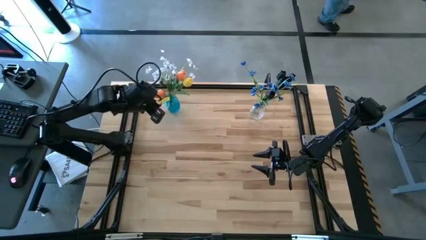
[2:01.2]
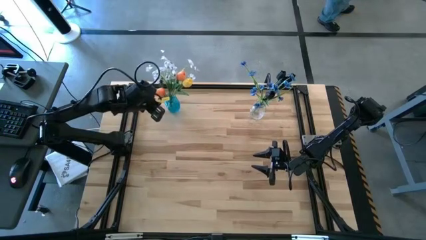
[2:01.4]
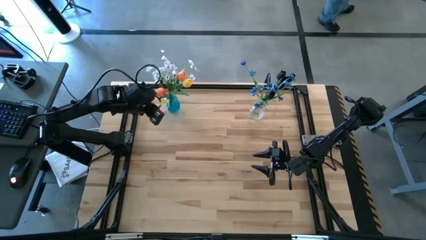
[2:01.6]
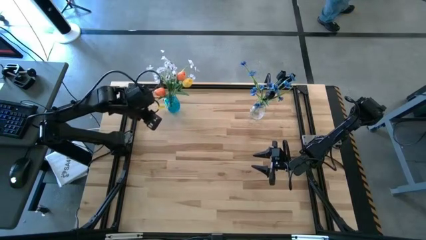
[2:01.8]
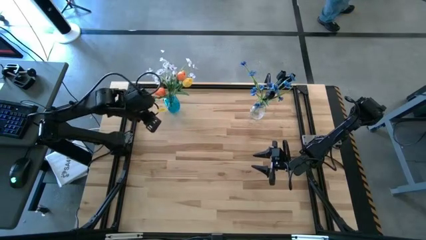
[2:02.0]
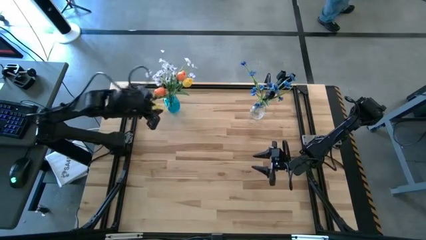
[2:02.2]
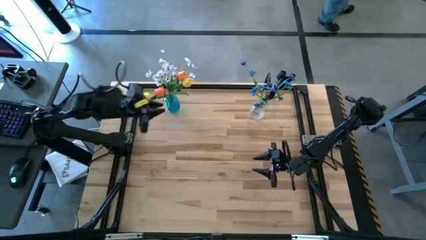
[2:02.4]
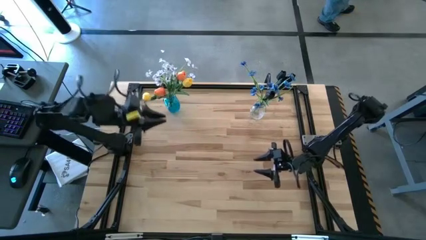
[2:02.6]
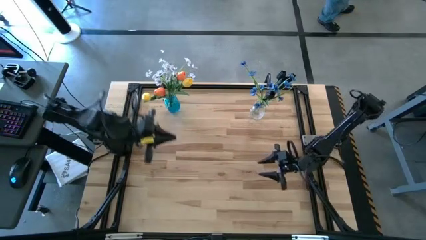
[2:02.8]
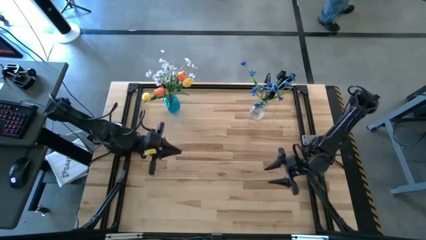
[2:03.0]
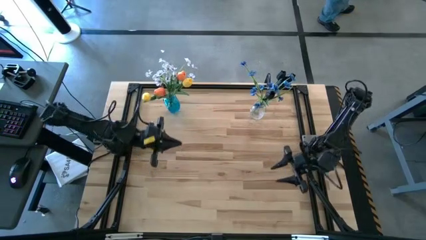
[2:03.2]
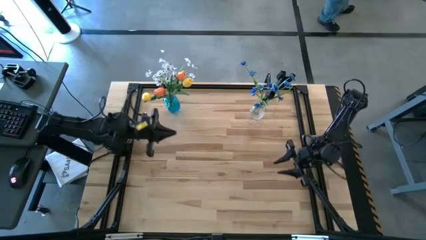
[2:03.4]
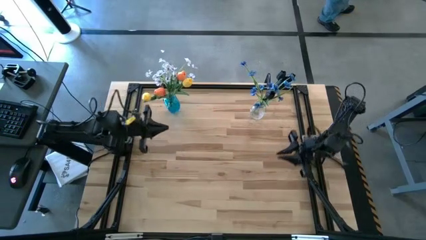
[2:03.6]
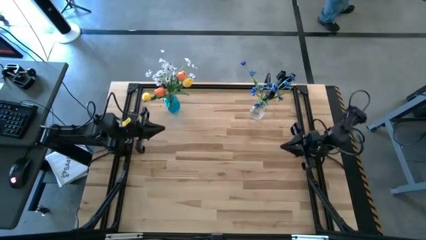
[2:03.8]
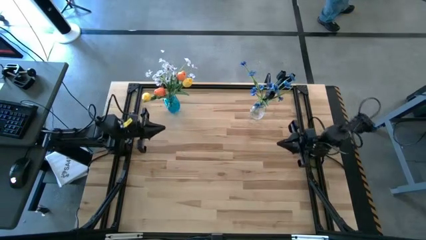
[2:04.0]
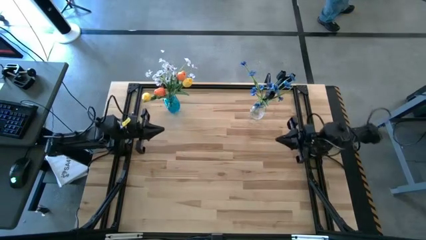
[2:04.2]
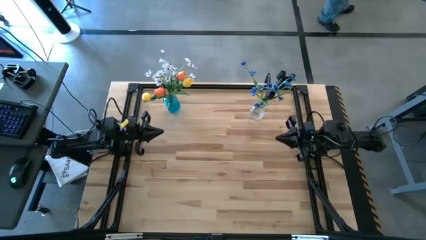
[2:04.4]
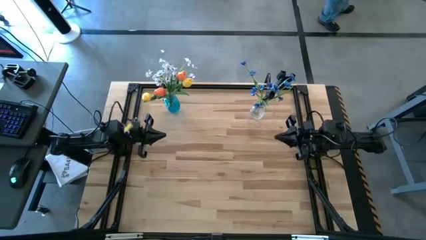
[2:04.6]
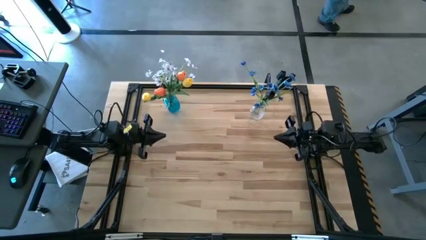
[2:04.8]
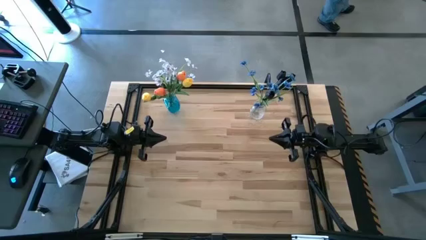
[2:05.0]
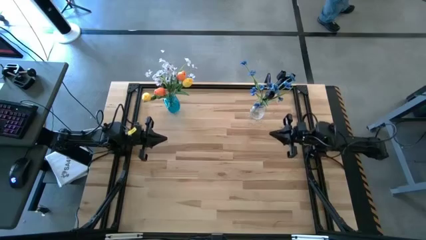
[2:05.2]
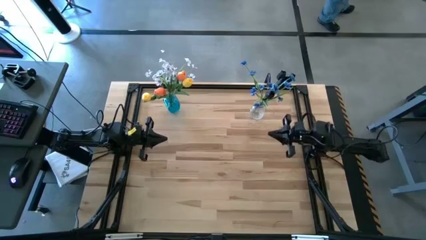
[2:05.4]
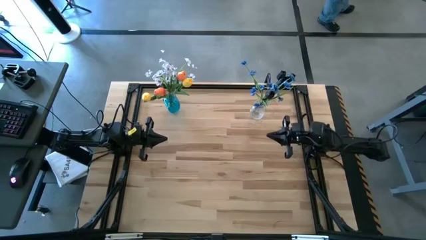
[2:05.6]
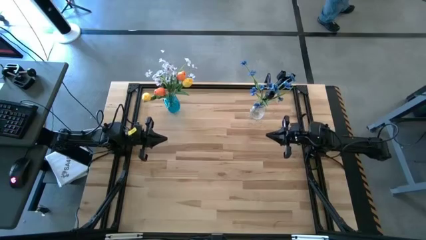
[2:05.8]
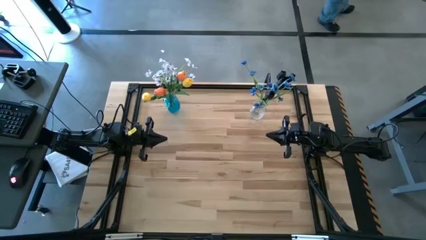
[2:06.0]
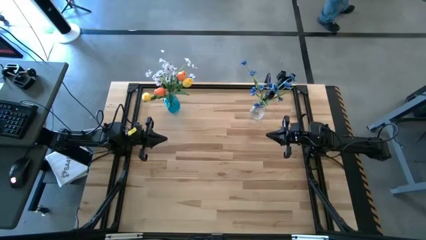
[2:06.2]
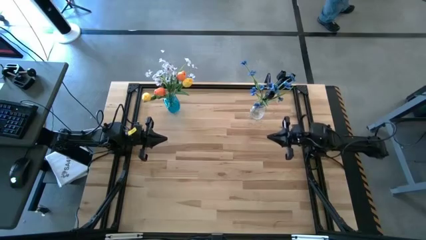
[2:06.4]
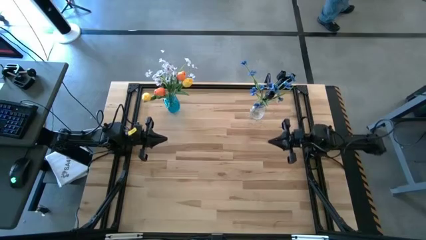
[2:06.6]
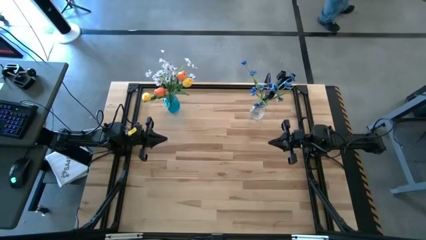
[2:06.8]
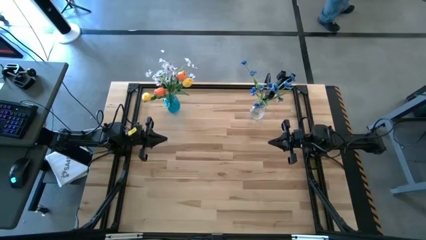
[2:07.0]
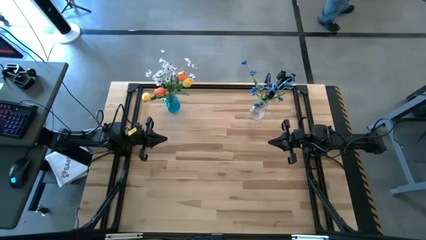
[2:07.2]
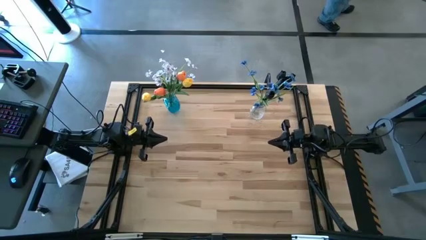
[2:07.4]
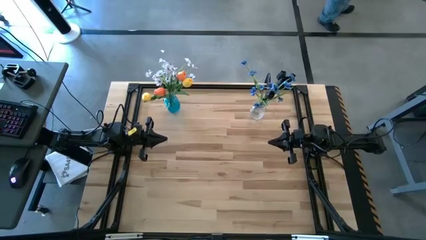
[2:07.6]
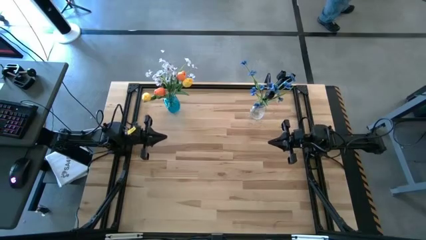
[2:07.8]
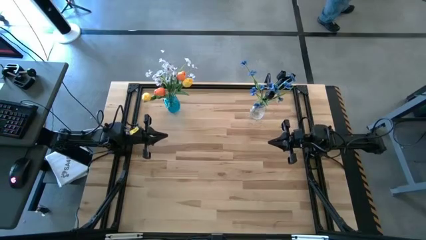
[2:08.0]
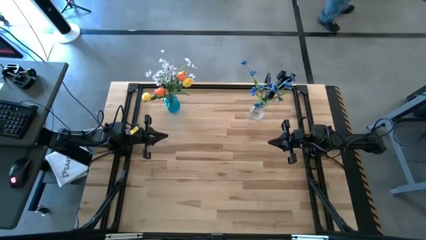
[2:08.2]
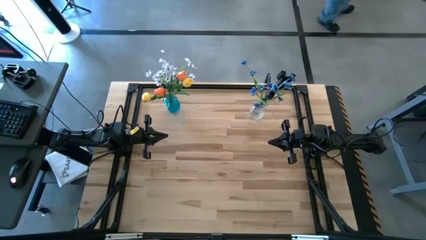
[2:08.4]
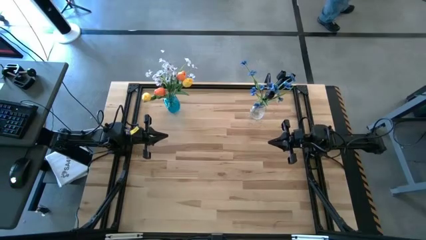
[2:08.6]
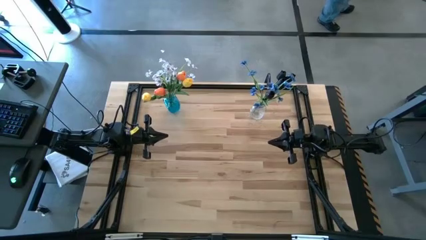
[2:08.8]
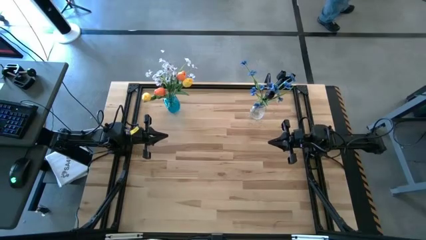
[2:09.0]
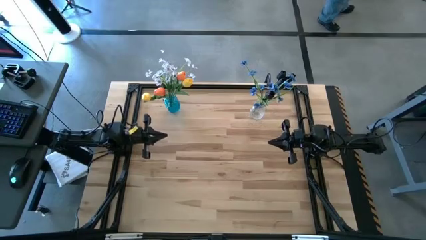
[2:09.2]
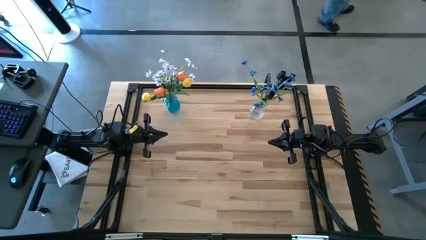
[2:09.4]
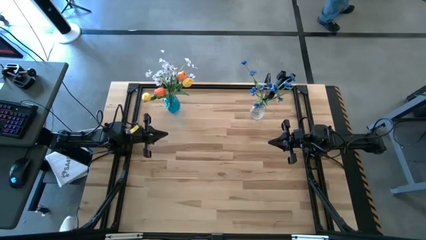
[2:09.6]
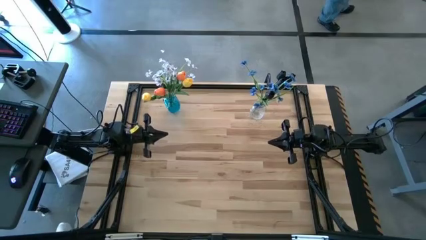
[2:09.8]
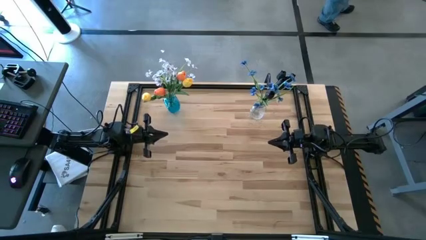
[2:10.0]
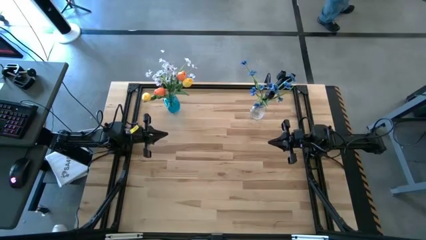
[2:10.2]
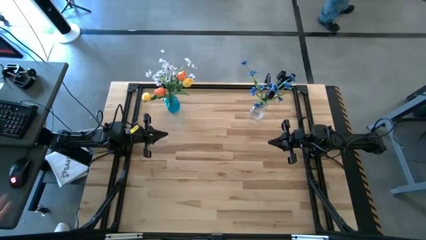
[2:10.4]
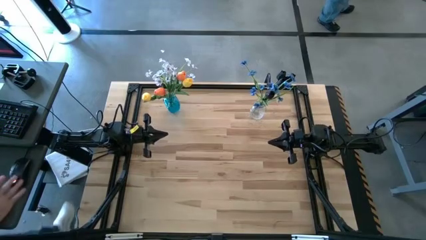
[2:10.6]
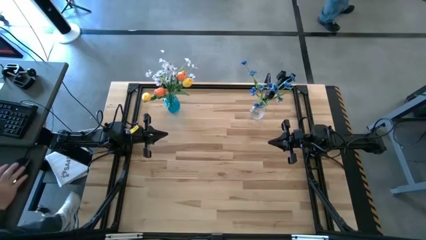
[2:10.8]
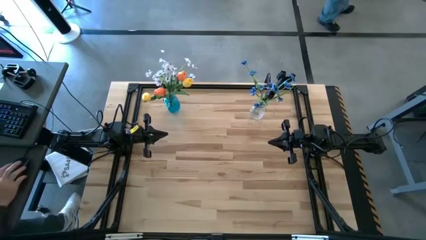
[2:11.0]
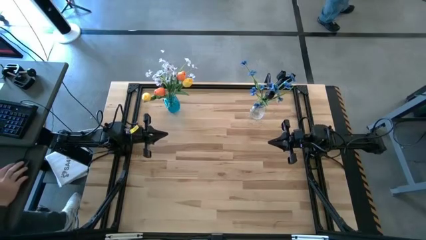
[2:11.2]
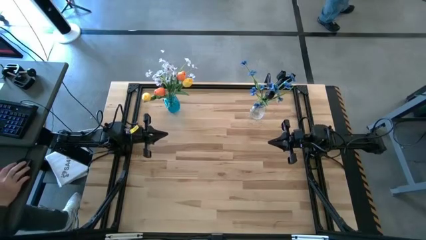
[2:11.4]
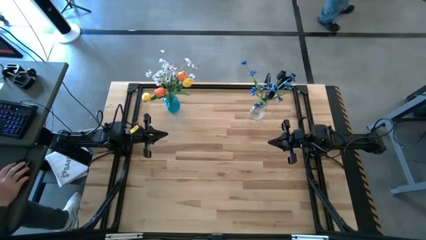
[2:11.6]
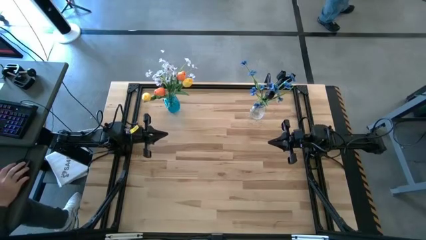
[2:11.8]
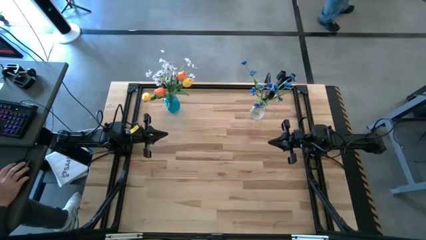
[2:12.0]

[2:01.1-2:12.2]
Task: Sort flowers into vase by color
Return to Home Position

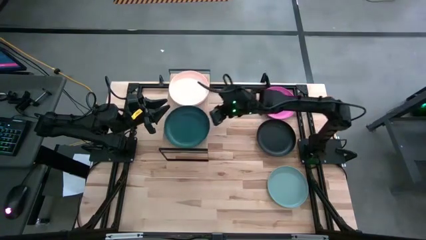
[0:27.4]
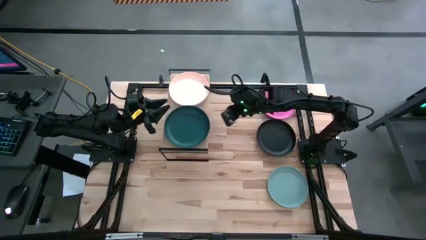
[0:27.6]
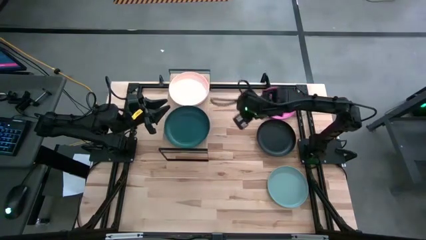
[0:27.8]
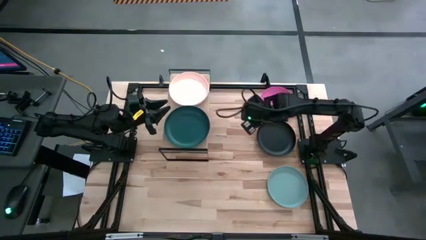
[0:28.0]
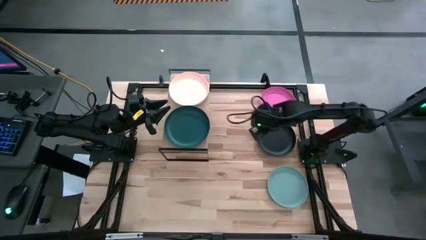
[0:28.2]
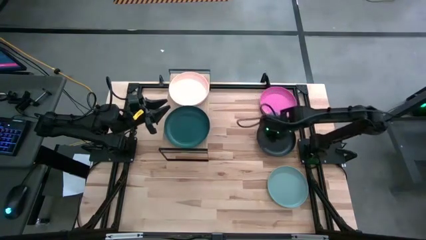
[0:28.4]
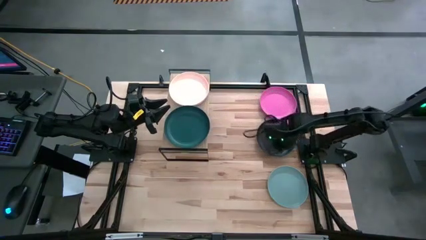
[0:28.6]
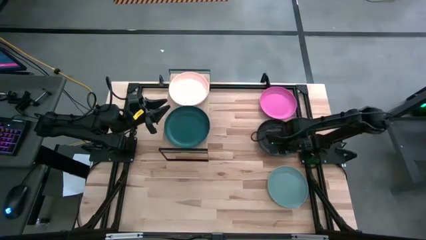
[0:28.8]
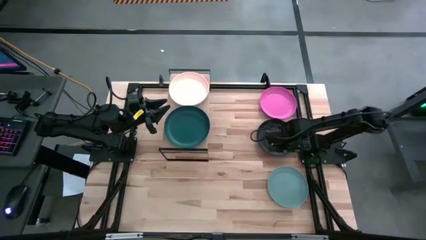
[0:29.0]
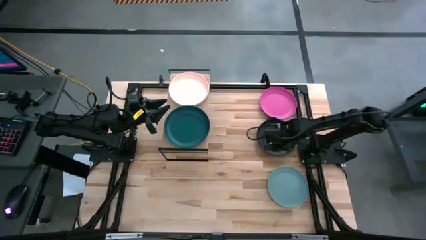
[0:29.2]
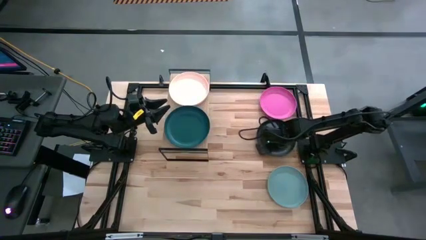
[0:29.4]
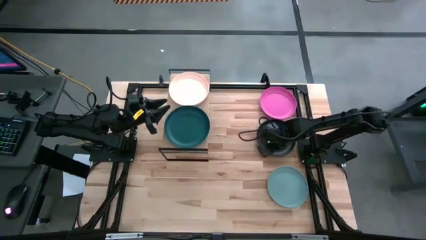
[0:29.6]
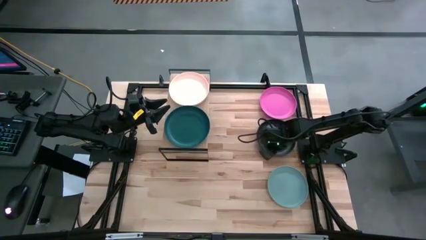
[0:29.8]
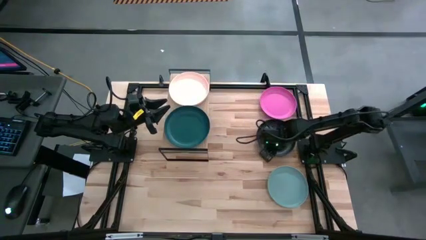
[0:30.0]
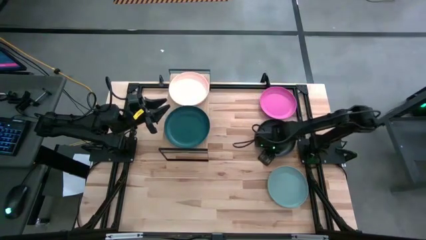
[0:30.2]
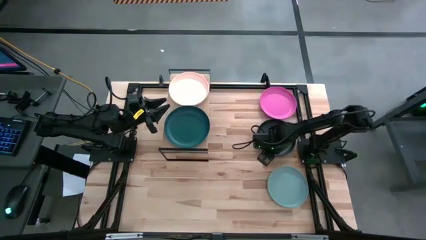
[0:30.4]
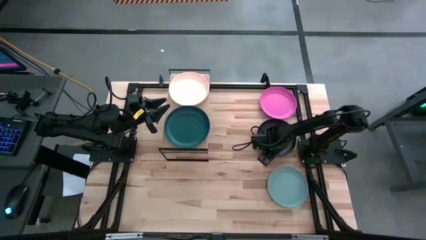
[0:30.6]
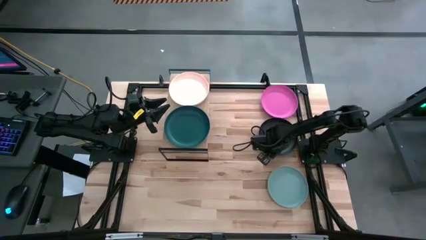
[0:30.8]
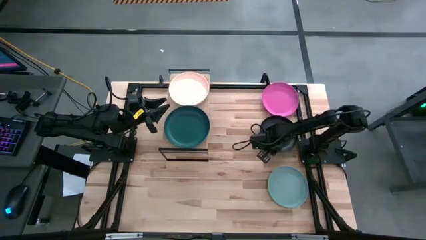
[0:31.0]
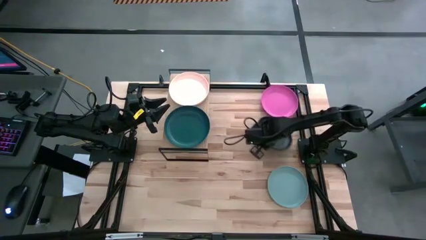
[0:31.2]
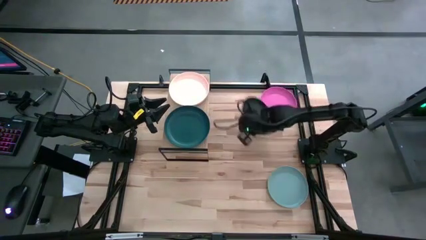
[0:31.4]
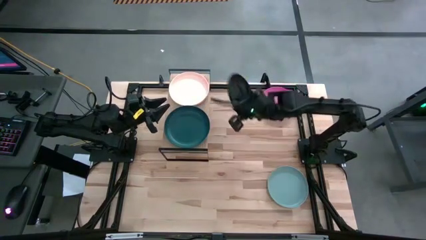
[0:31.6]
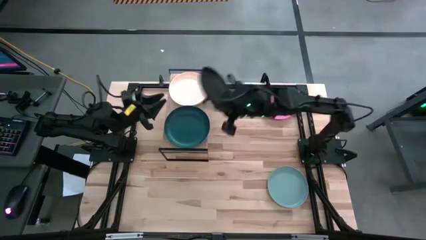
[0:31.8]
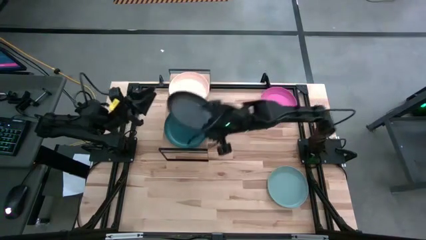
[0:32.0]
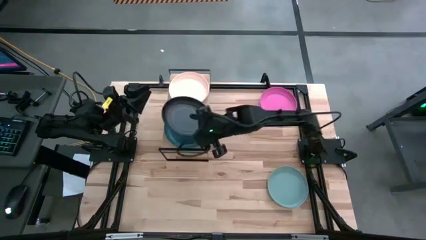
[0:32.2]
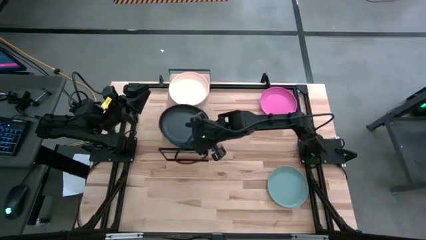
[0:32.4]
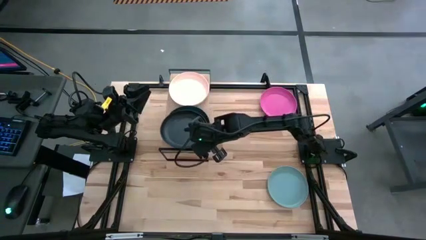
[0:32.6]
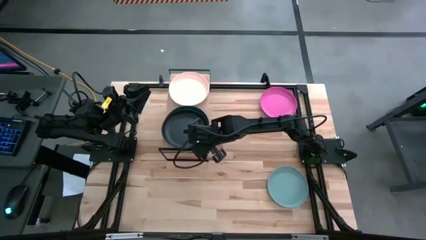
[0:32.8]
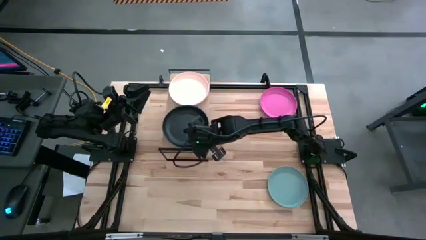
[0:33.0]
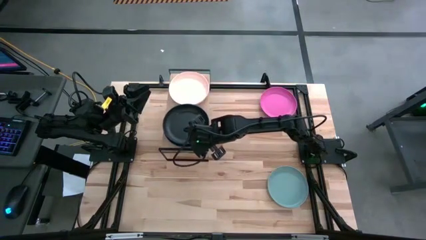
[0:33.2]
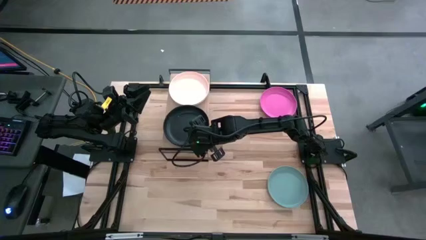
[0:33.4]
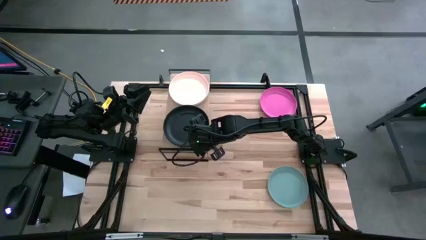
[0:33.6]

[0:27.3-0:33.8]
Task: Place and stack plates onto a shelf
Stack the black plate on top of the dark blue plate on the shelf
